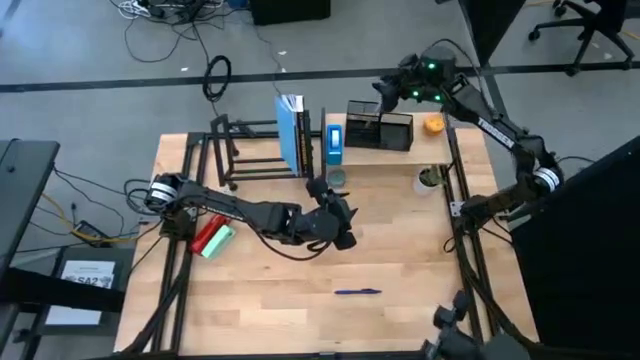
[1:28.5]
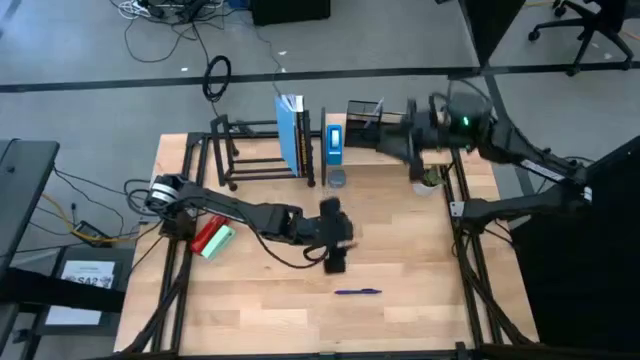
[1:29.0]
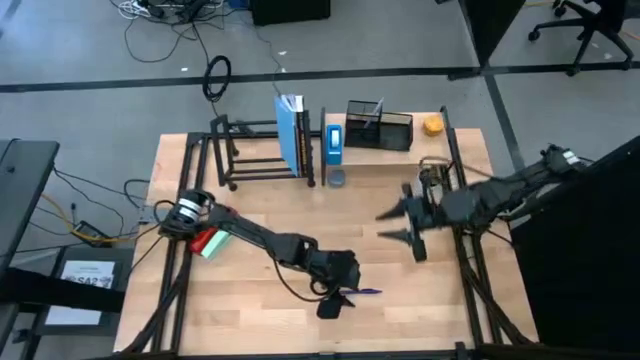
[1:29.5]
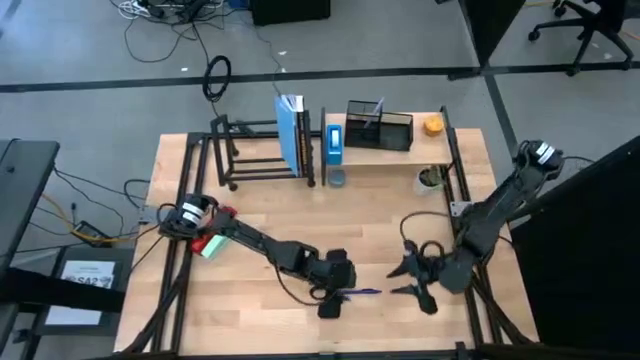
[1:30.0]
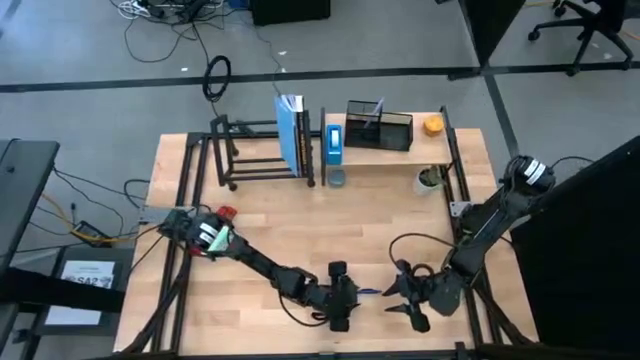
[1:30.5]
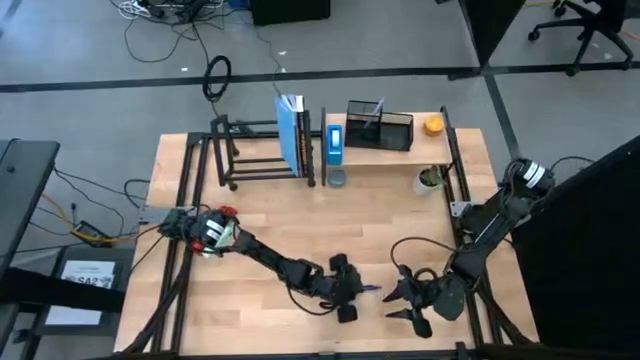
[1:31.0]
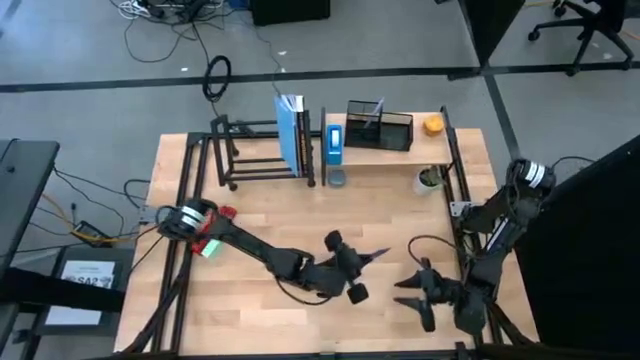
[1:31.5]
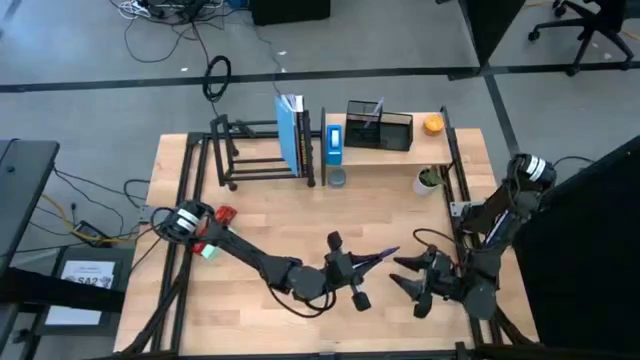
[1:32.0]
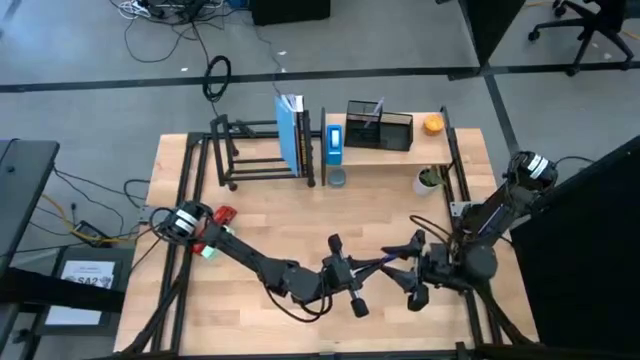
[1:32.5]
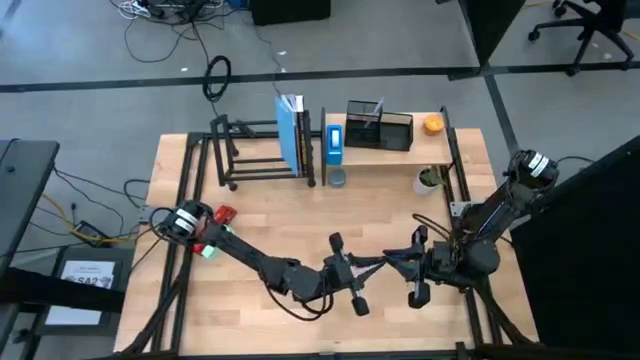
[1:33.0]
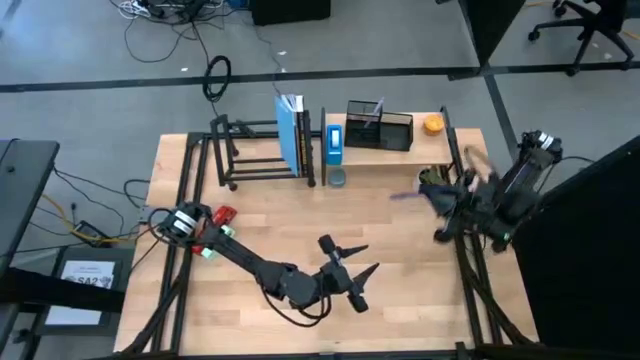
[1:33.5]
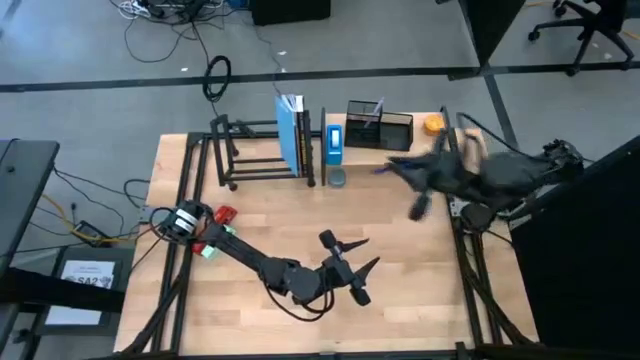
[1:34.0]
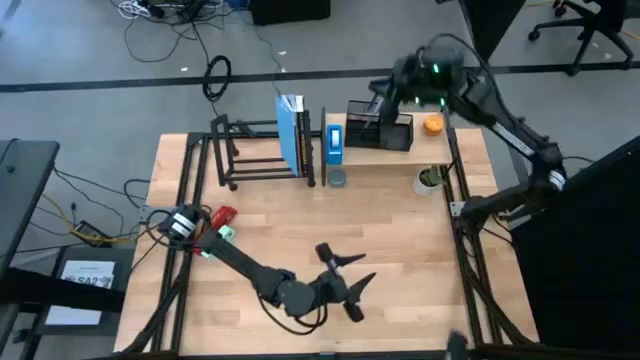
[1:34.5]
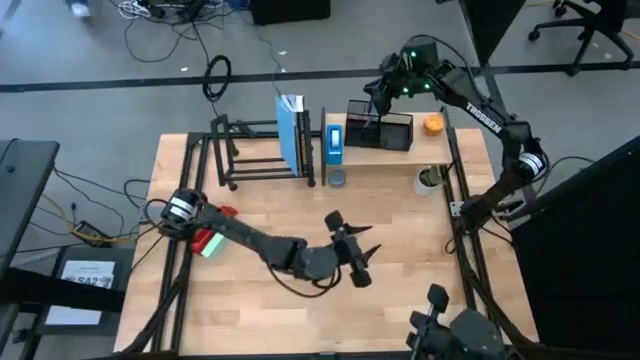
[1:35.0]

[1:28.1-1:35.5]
Task: Stock shelves
Put the blue ball pen into the pen organizer on the shelf

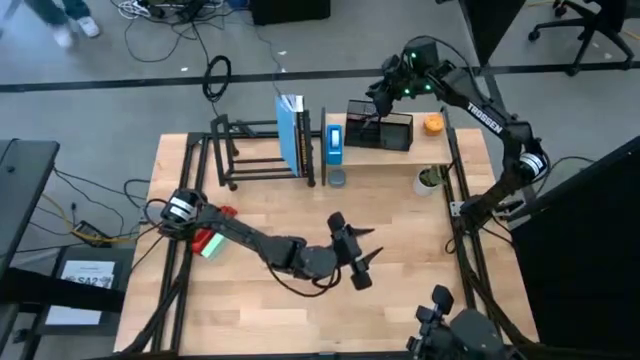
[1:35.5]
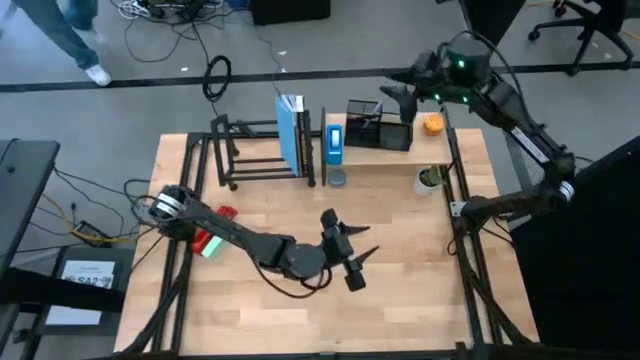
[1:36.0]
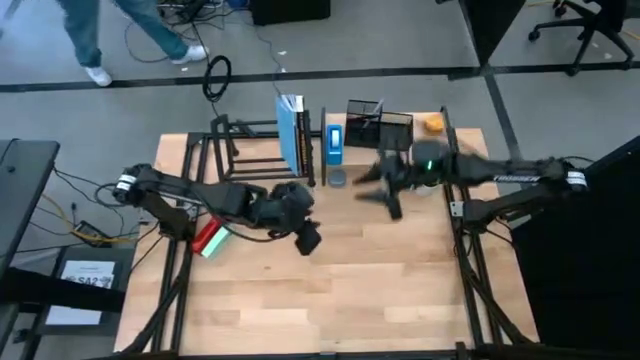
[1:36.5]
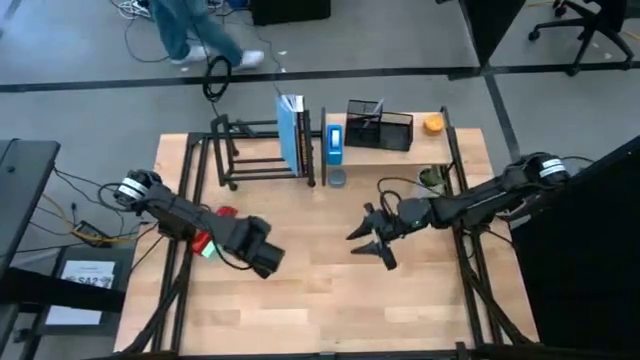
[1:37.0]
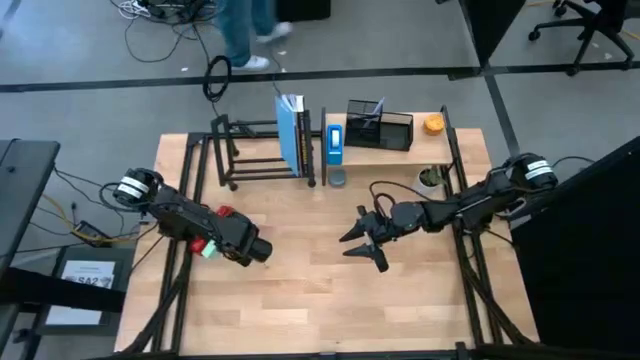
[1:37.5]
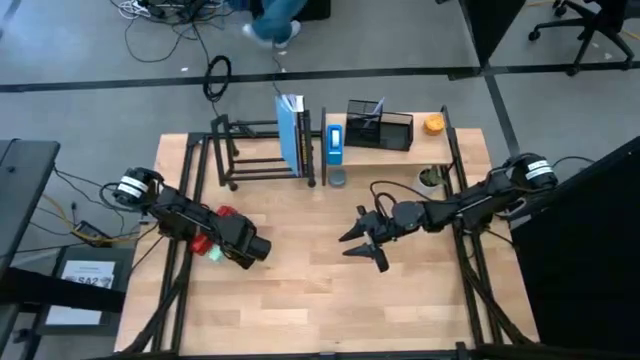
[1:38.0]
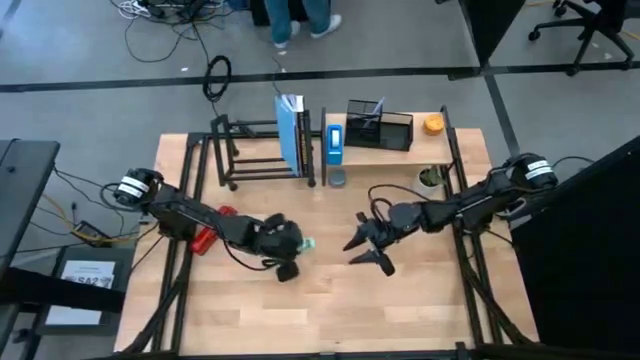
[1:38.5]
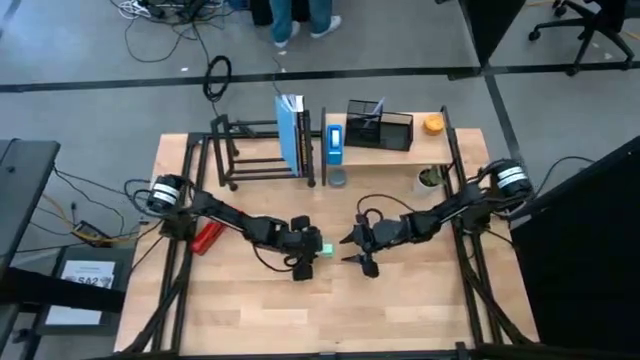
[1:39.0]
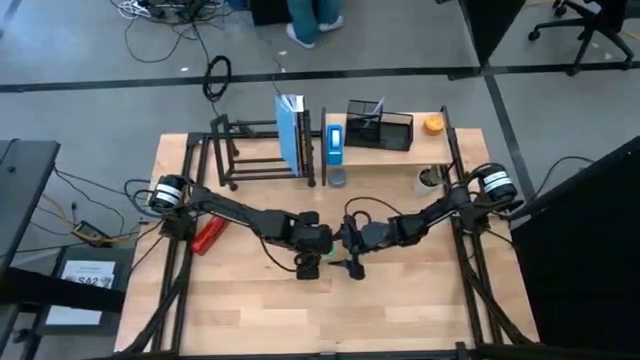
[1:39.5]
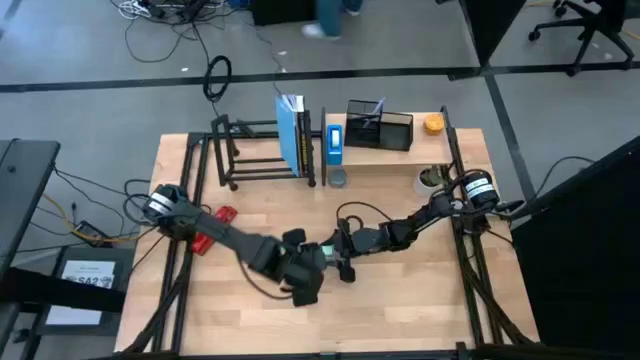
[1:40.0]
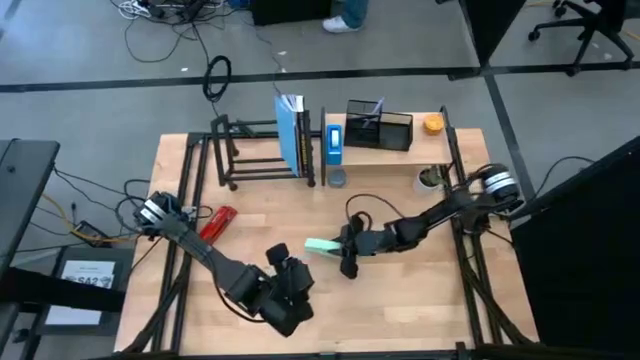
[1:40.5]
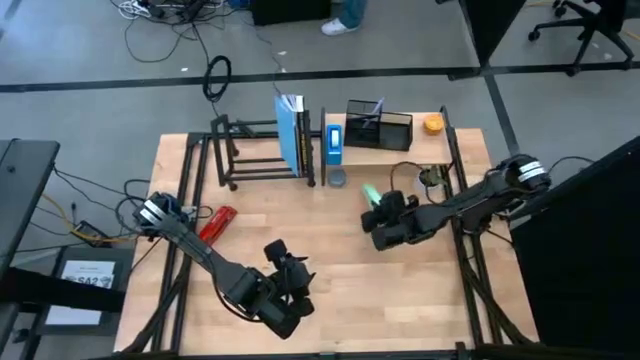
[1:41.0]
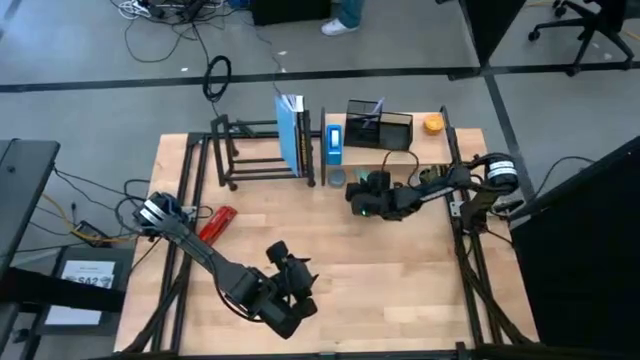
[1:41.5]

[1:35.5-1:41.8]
Put the green stapler under the shelf

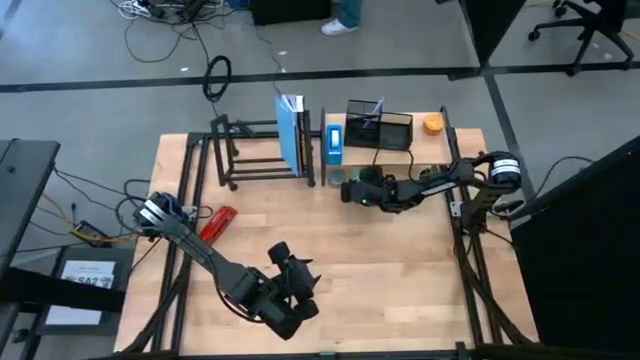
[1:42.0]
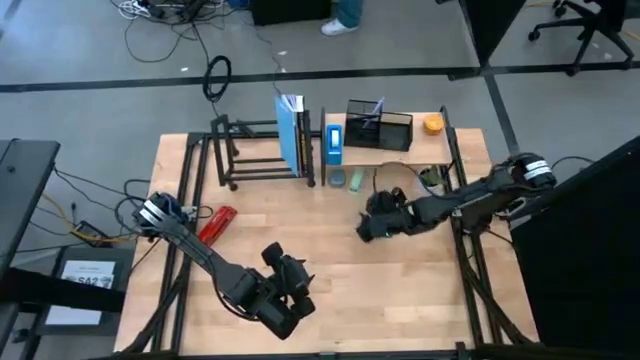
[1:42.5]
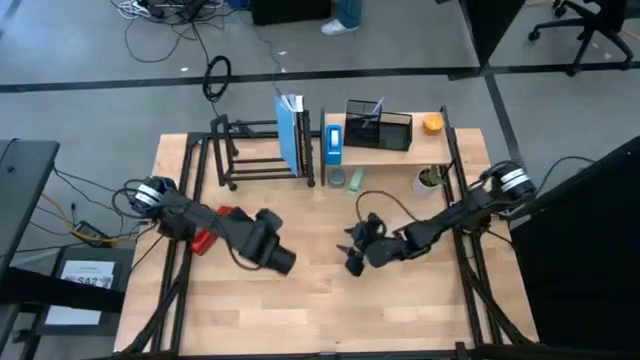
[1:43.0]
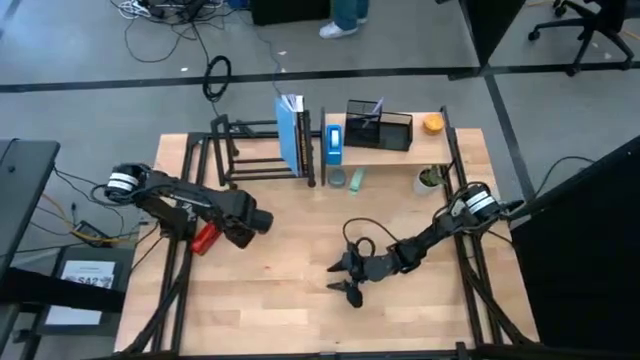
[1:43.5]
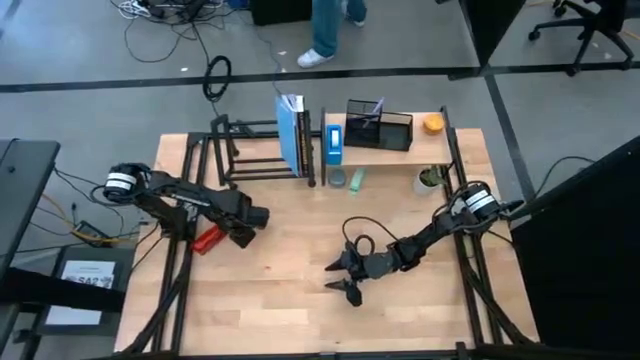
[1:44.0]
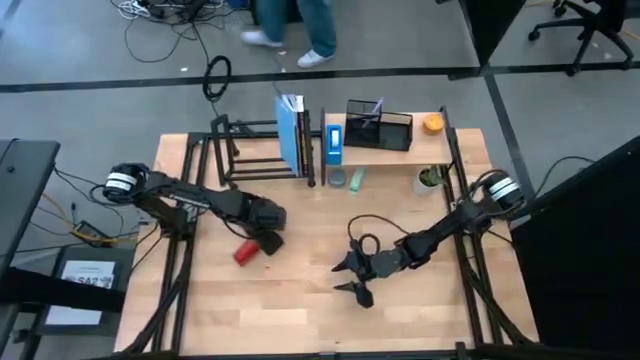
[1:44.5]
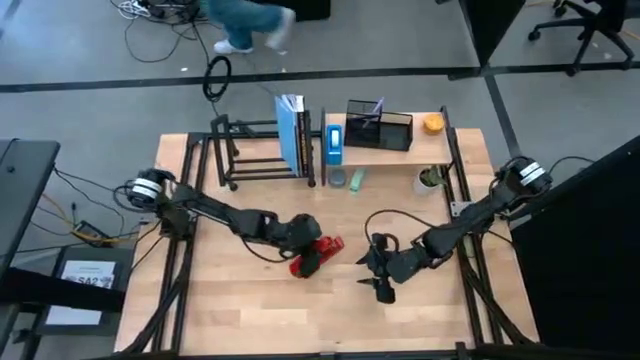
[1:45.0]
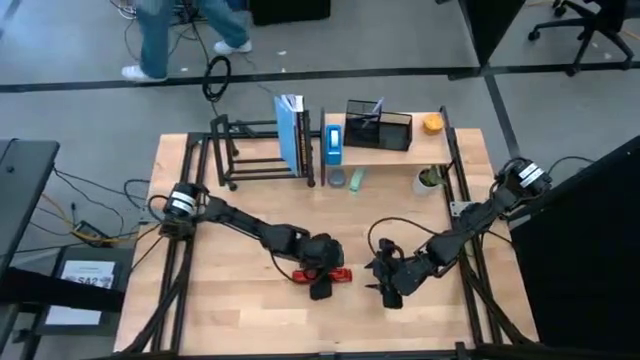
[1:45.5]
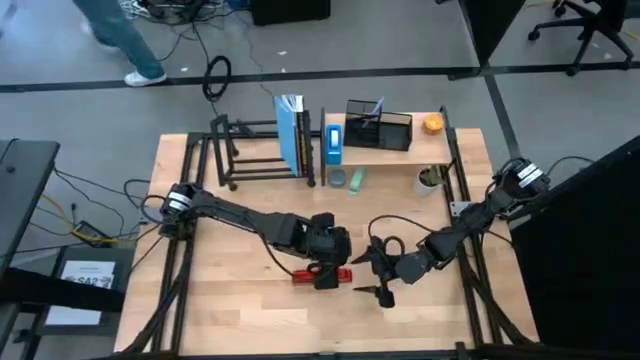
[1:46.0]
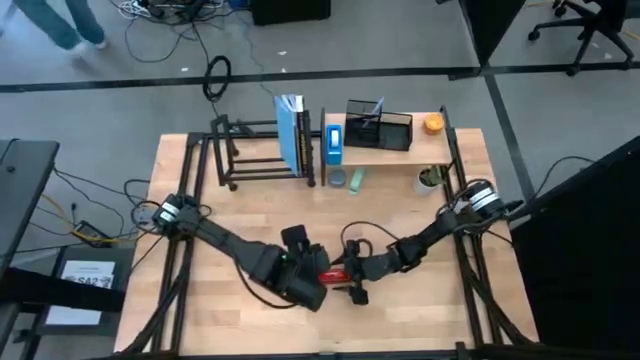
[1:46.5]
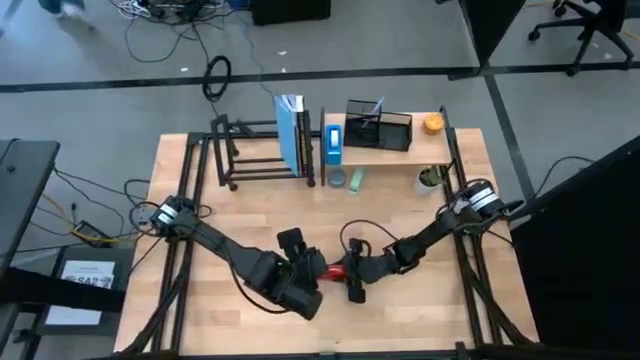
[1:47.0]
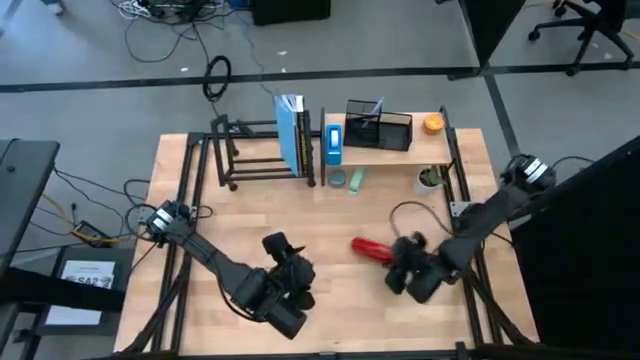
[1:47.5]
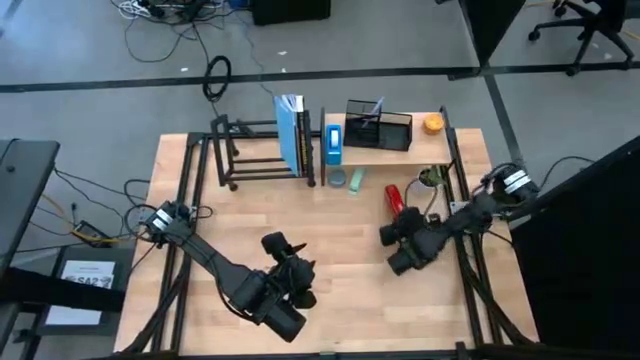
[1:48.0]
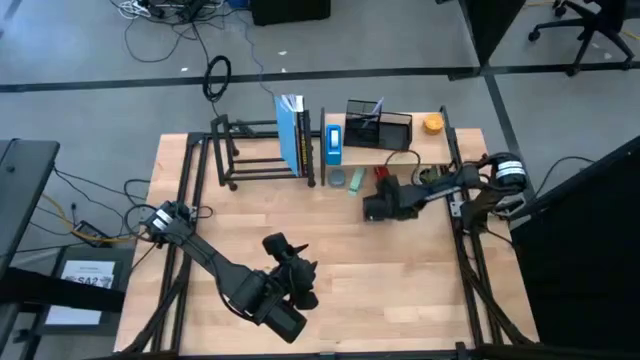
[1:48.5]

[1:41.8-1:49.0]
Put the red stapler under the shelf
